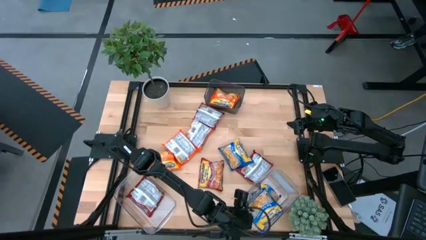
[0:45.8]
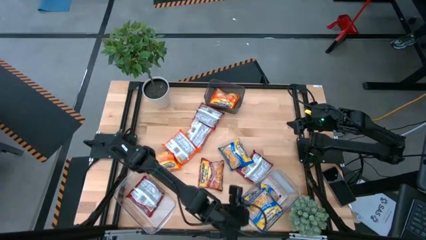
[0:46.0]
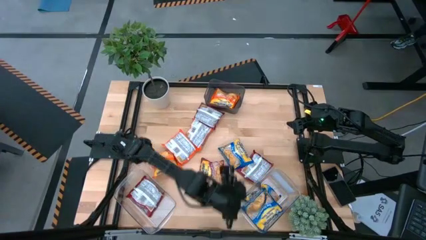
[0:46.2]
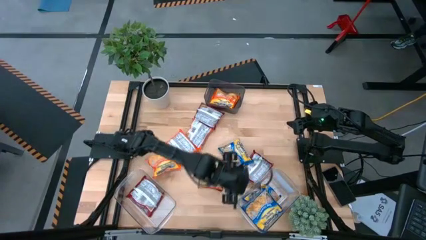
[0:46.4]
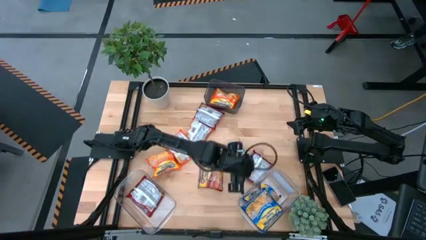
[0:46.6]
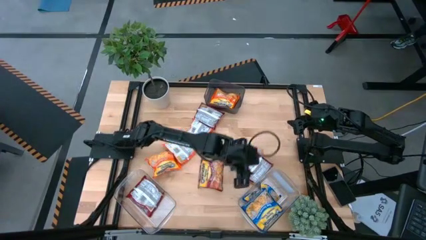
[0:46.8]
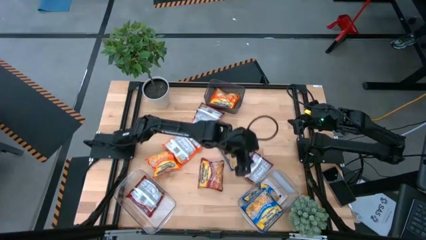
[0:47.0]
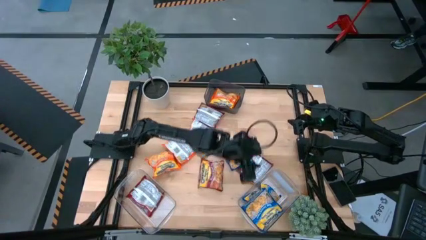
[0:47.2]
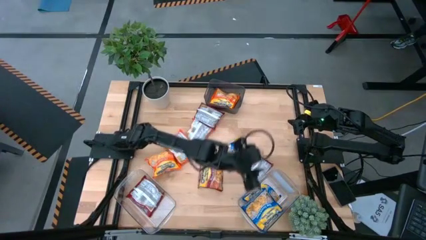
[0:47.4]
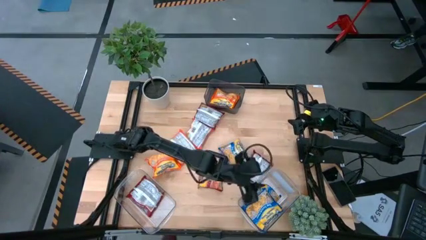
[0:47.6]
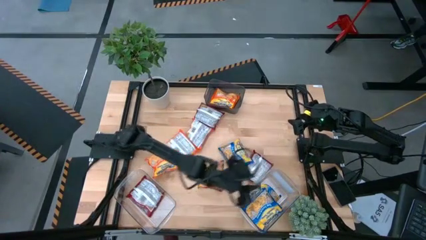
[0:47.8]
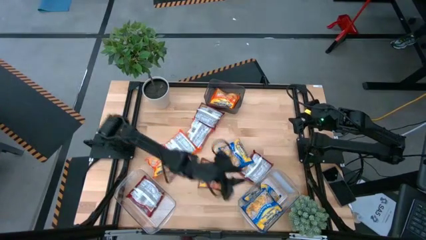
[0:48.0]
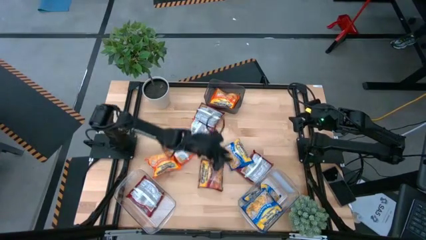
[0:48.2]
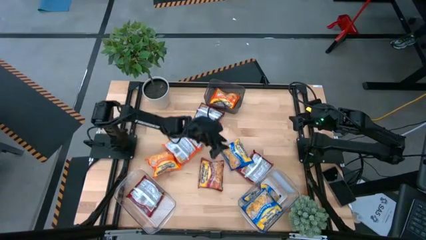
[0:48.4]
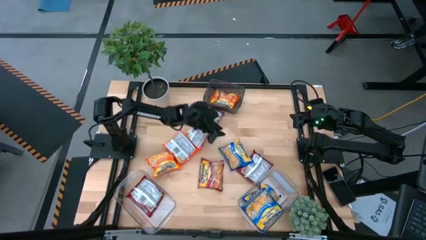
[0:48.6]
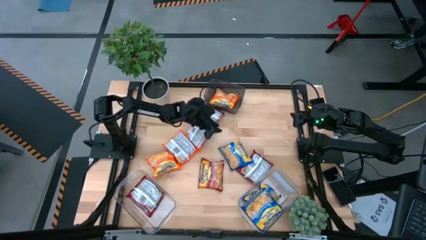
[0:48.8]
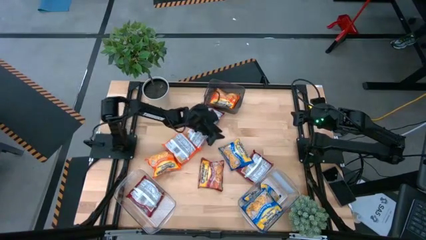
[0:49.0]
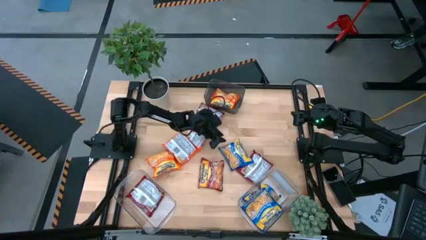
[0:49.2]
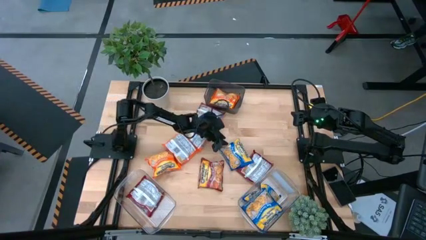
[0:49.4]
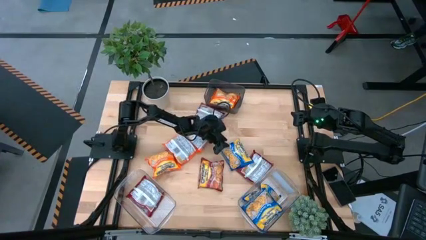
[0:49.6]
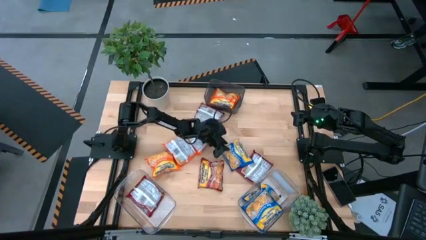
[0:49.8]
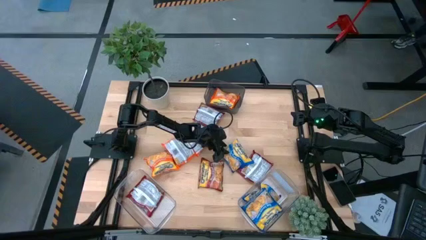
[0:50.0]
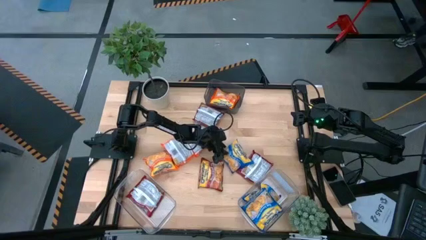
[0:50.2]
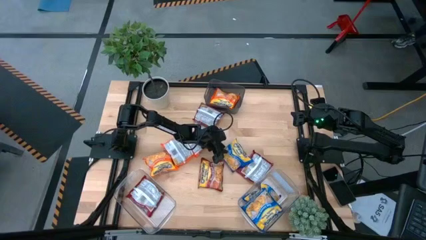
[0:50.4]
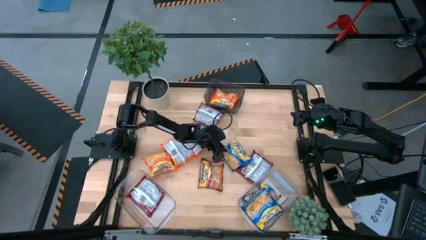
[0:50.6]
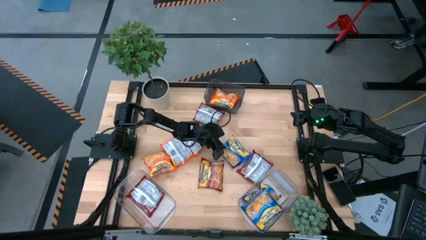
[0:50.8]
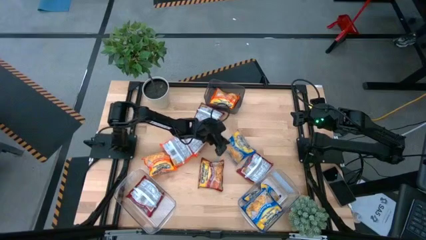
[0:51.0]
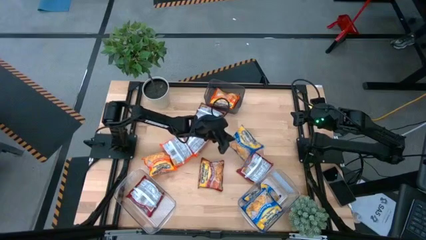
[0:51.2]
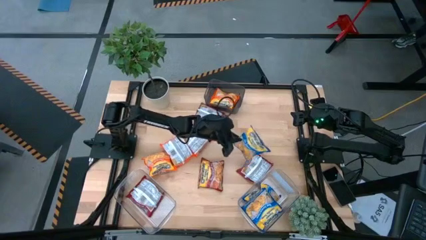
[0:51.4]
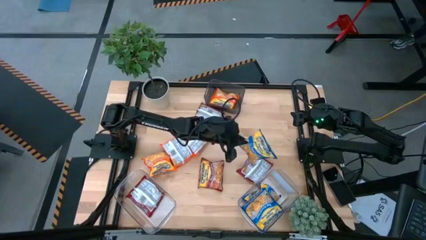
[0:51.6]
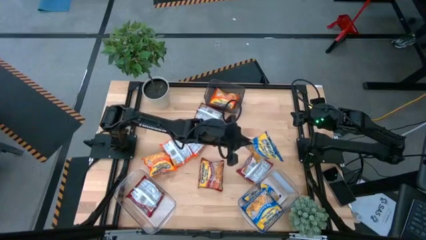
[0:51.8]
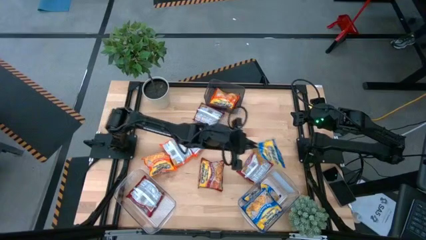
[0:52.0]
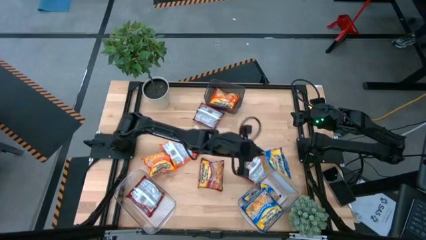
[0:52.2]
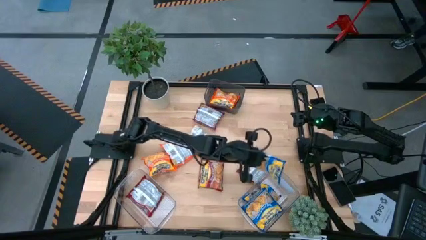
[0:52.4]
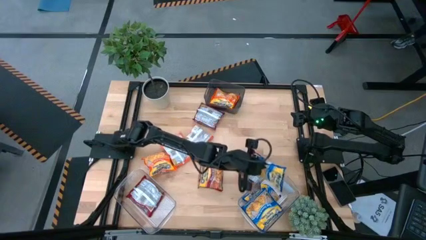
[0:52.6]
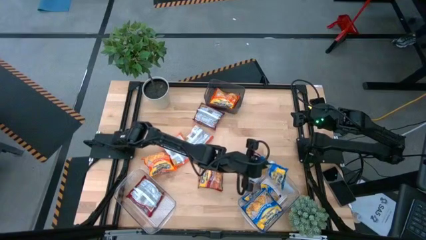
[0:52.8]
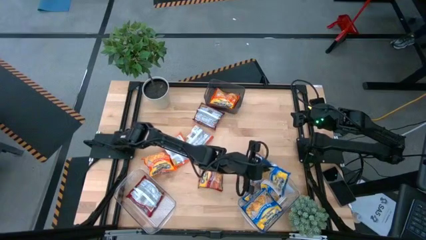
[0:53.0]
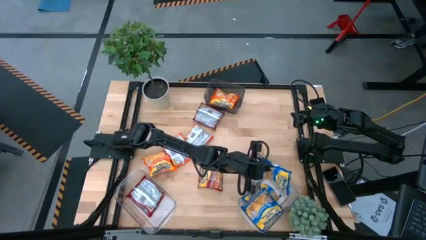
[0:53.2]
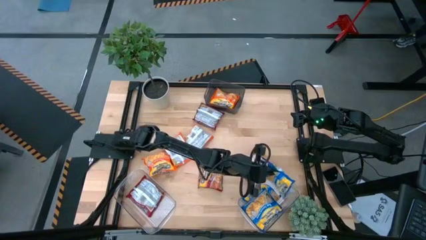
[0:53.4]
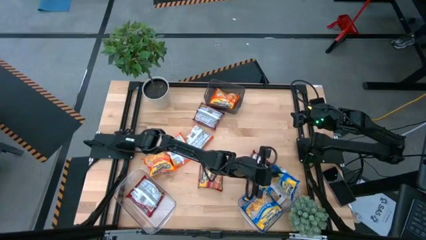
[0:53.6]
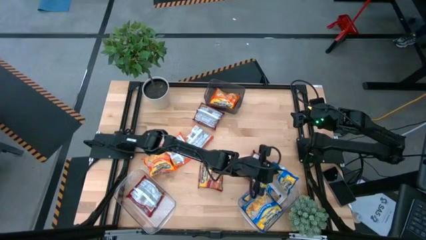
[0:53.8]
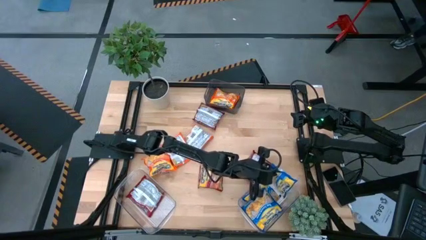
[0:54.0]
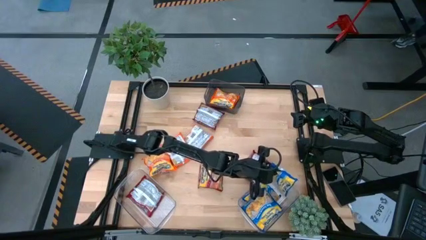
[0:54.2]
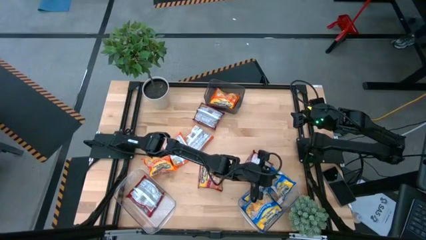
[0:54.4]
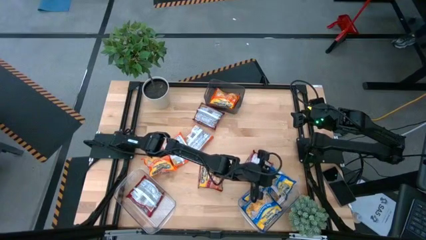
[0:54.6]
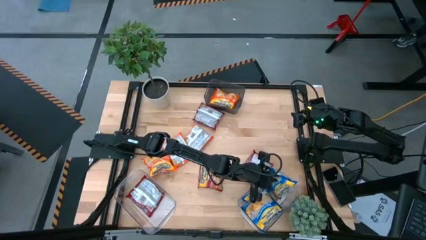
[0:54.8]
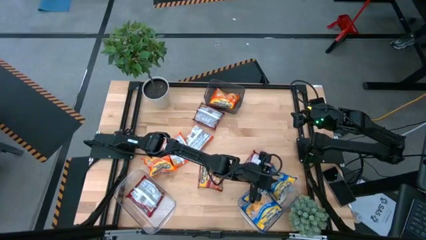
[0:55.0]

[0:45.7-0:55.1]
Task: Sort Maruchan noodles
Put the blue noodle pack into the right transparent bin

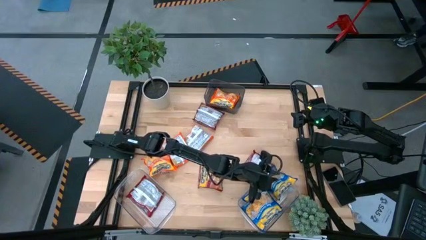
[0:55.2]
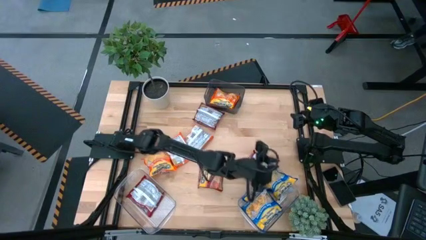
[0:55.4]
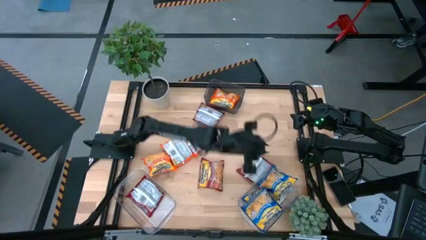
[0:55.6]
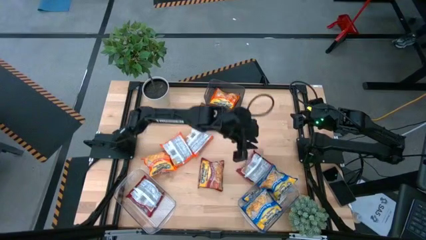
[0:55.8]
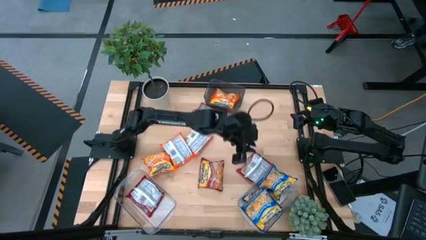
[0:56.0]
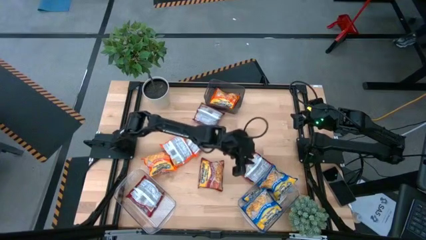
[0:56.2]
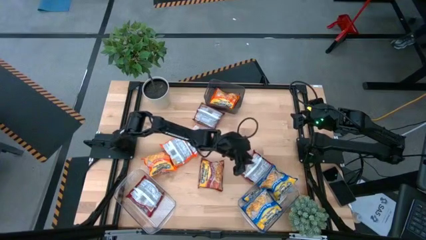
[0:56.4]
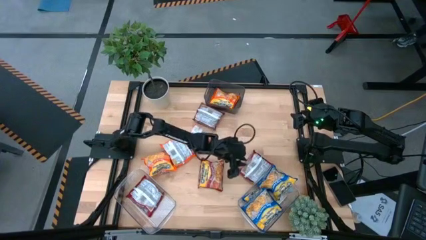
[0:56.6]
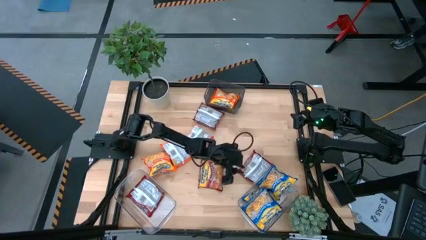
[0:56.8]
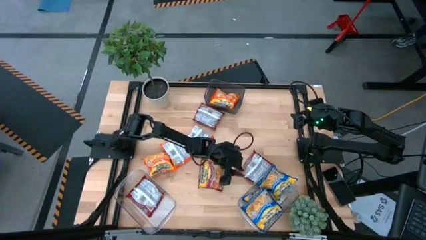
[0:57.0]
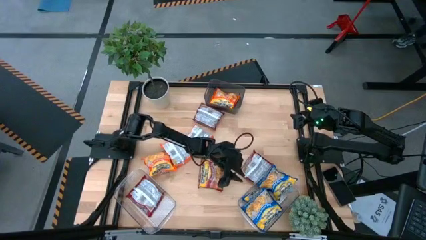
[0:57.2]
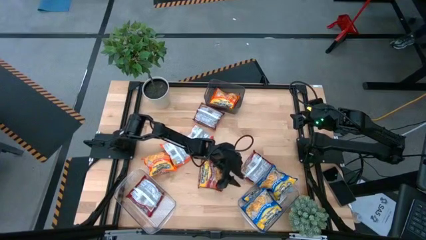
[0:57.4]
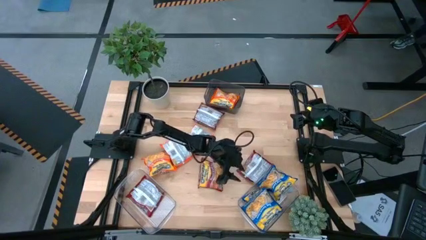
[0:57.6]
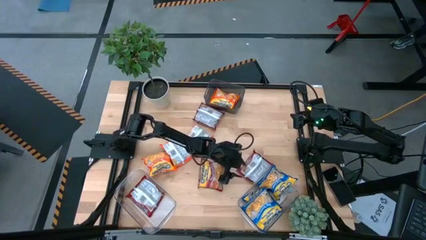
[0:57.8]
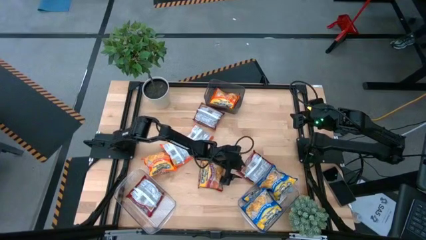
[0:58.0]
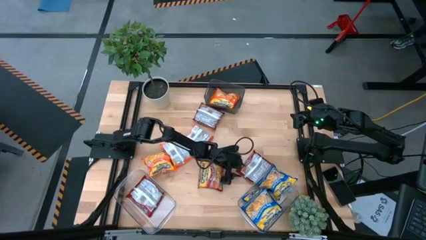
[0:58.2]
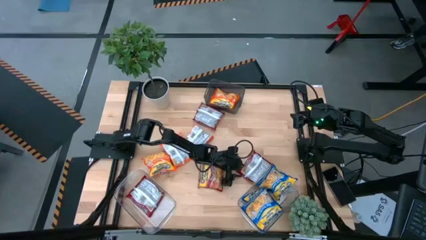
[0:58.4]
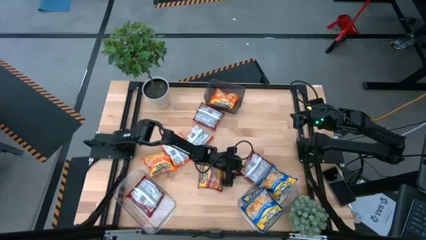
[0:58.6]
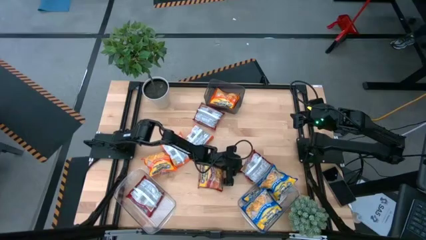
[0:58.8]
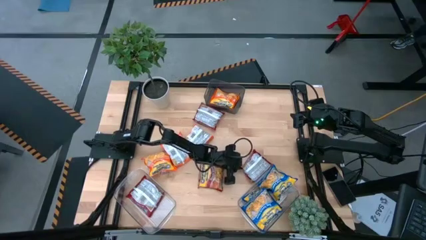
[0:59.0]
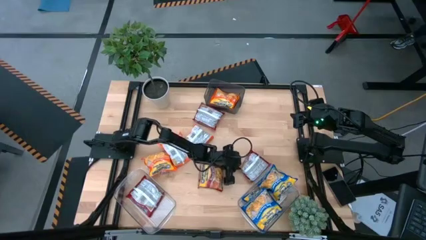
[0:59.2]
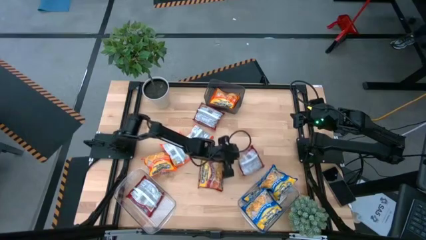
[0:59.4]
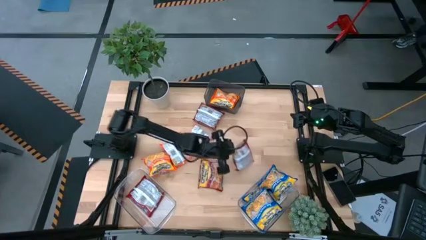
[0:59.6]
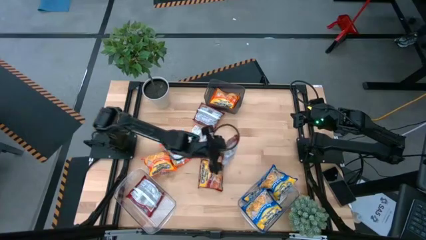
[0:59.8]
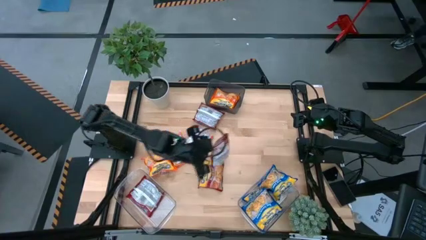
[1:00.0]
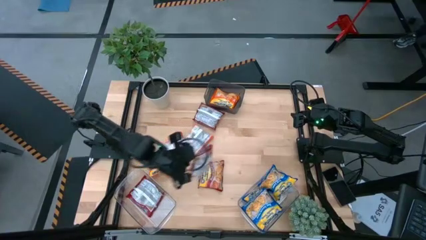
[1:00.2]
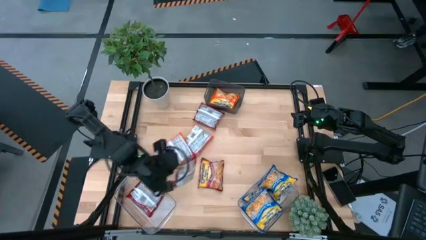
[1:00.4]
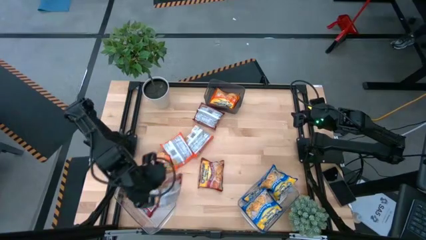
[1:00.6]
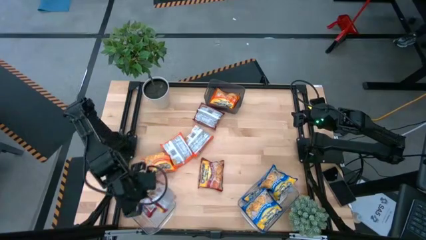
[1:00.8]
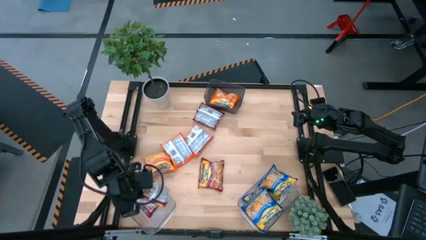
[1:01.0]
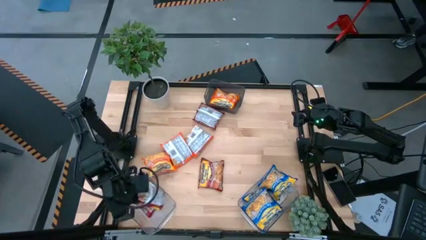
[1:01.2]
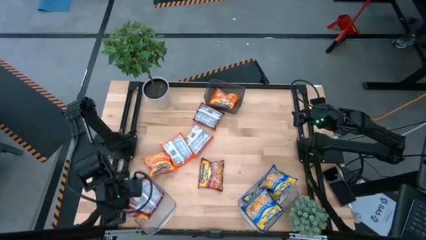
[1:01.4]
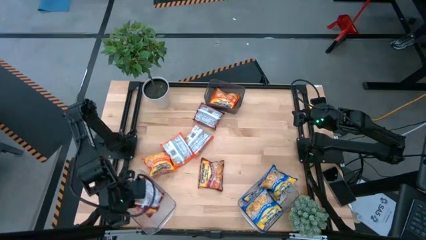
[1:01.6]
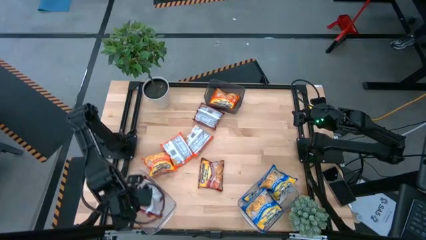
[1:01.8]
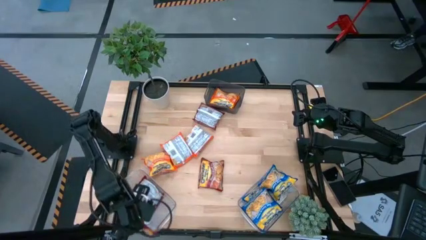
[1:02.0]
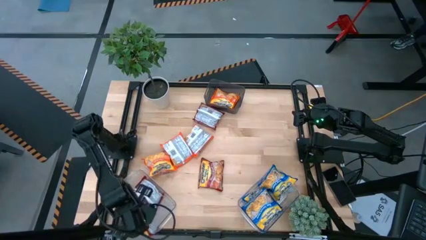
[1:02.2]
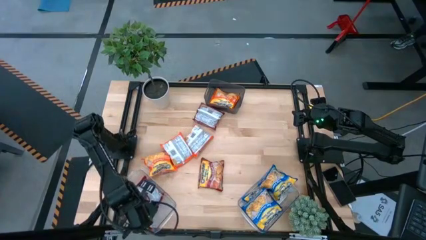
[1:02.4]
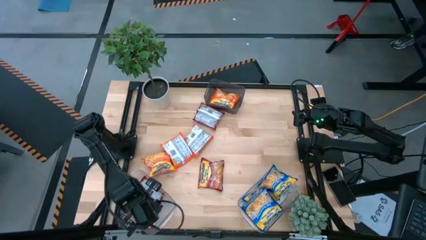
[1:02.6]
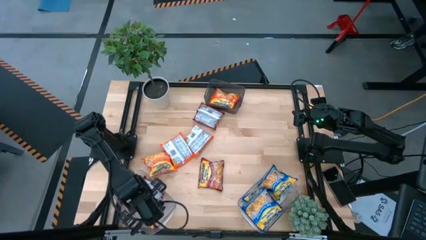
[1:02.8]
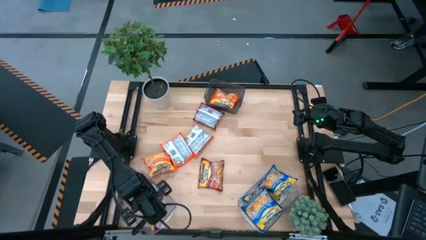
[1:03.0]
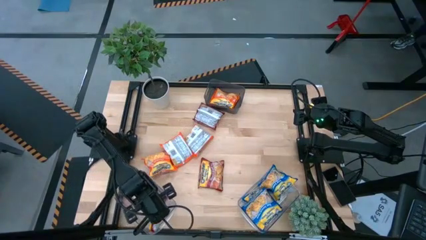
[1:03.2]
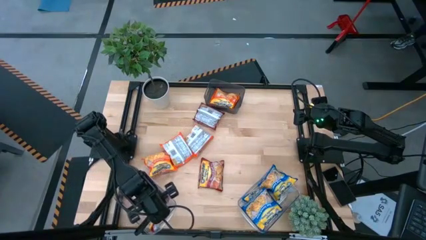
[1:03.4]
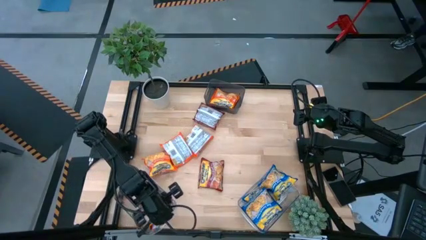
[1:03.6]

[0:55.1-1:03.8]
Put the red noodle pack into the left transparent bin
